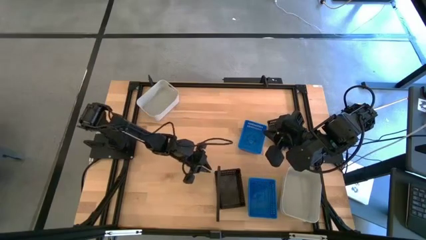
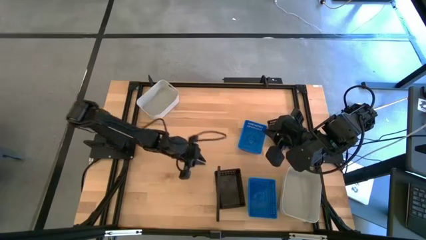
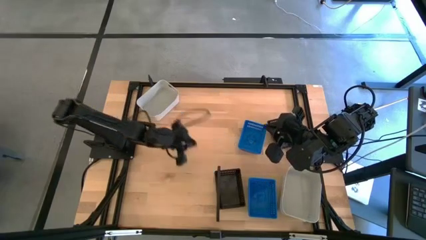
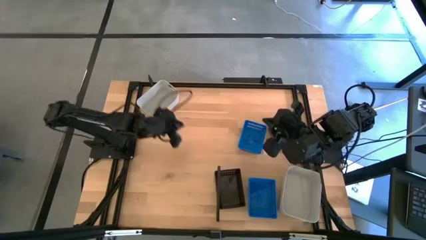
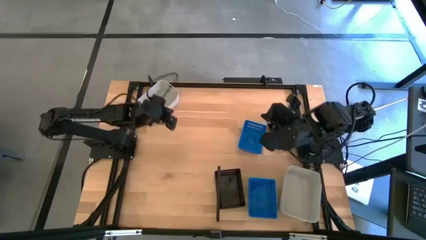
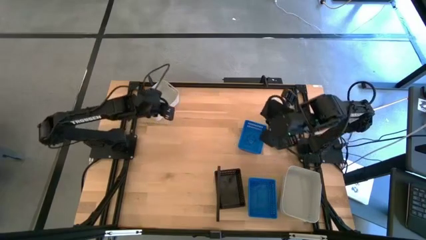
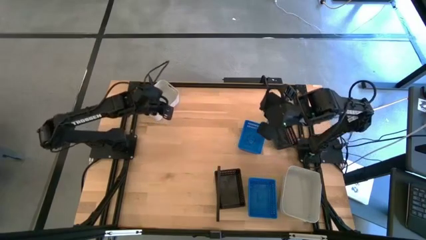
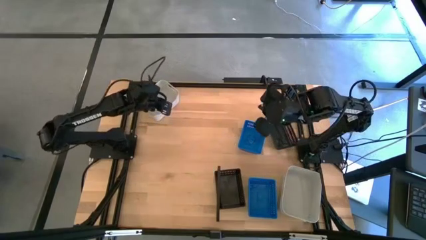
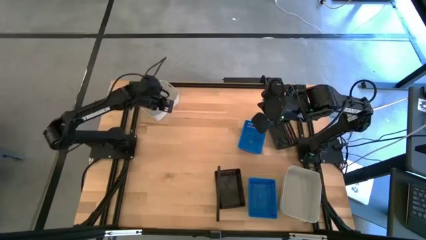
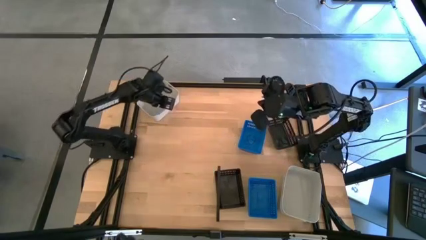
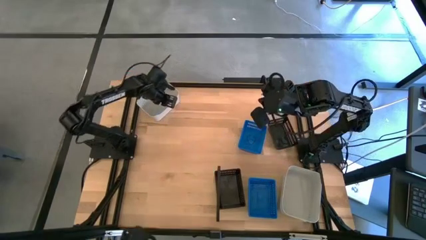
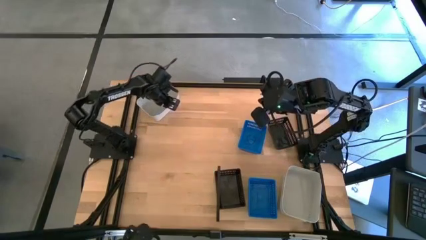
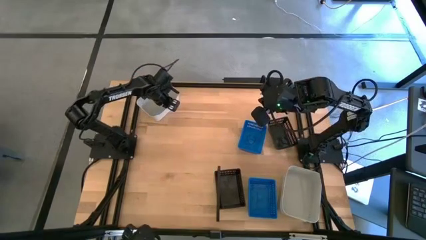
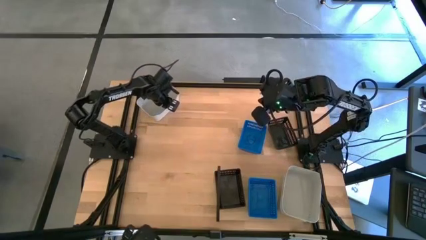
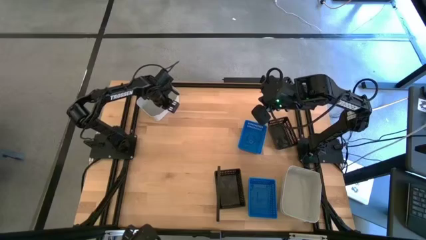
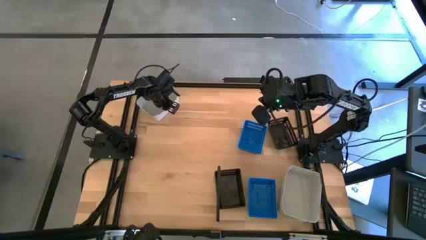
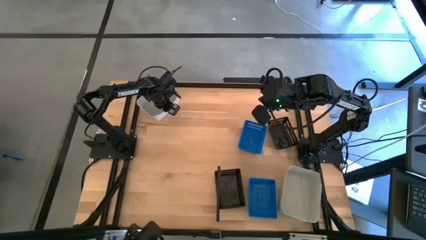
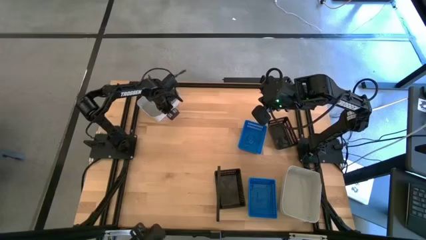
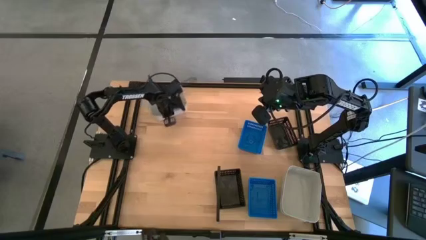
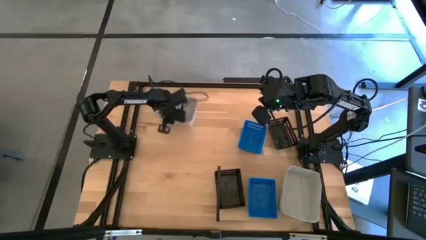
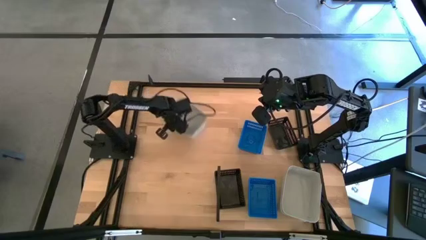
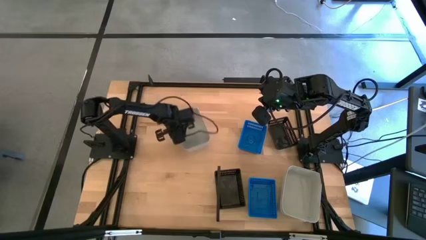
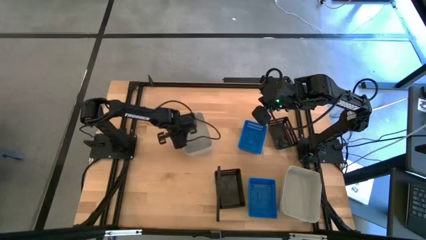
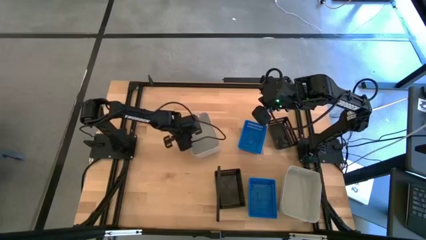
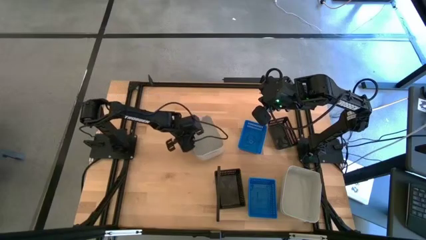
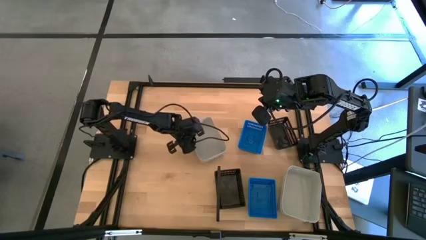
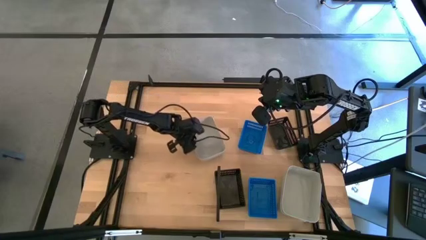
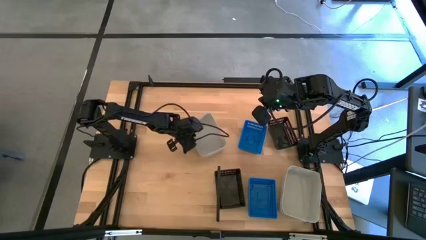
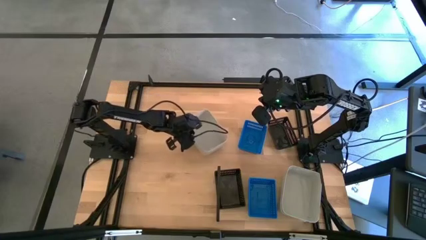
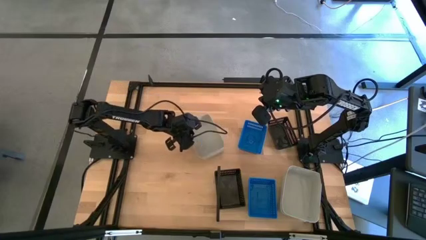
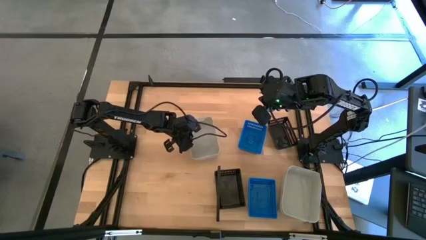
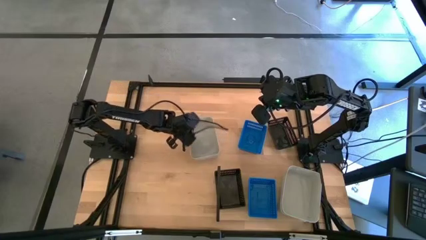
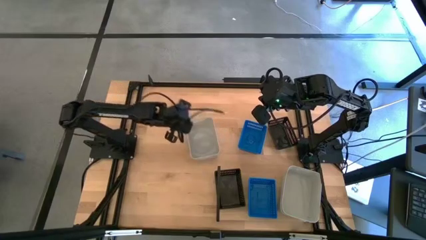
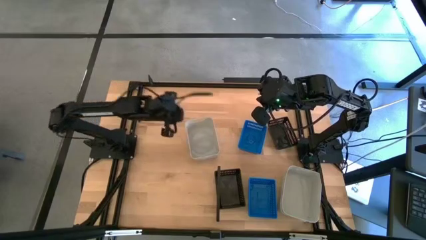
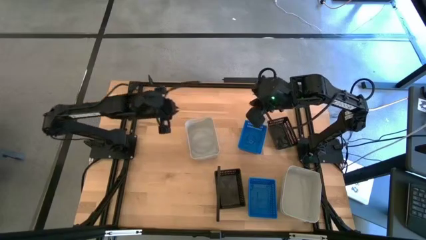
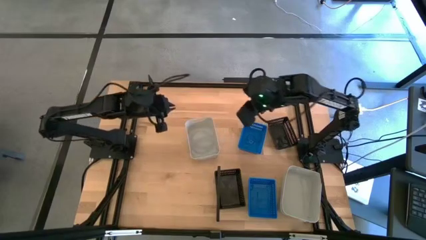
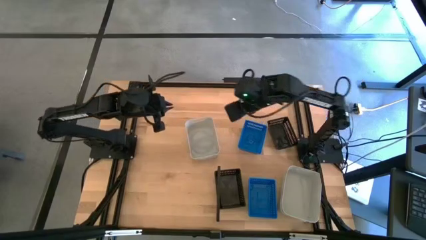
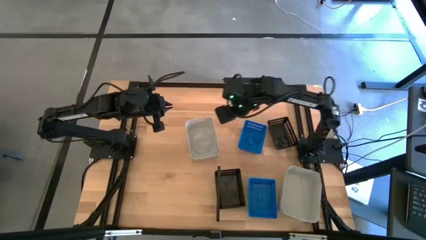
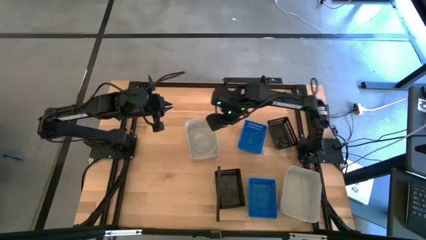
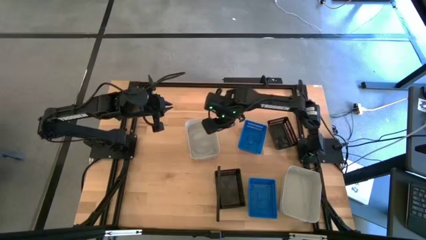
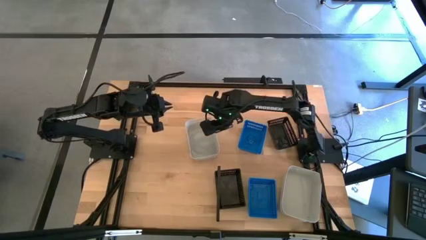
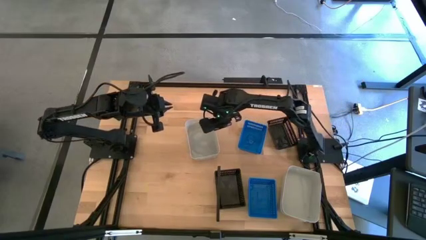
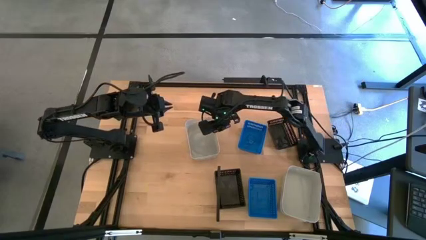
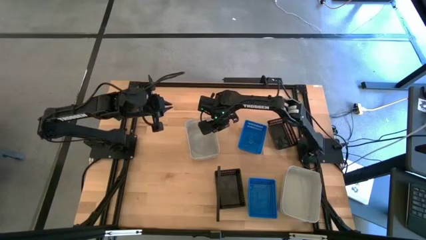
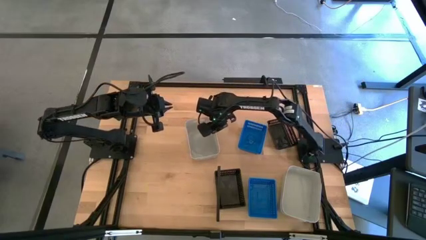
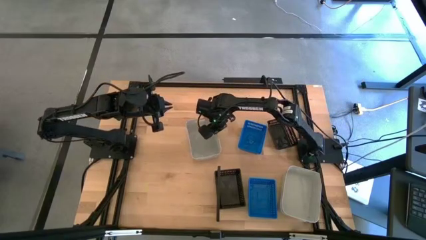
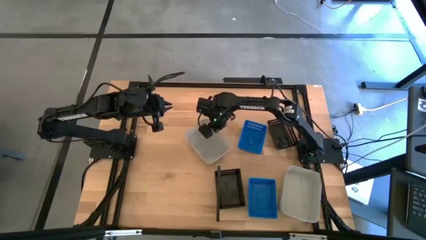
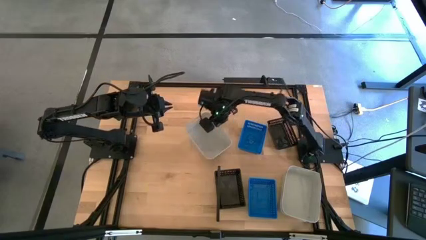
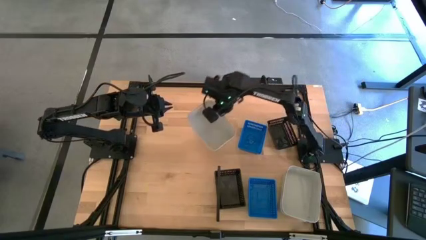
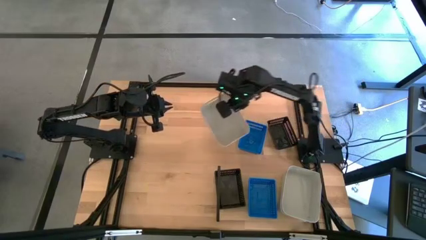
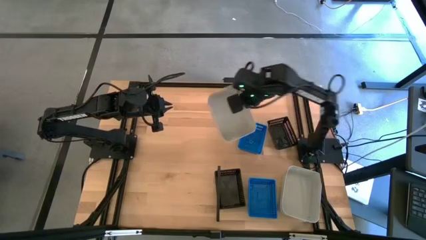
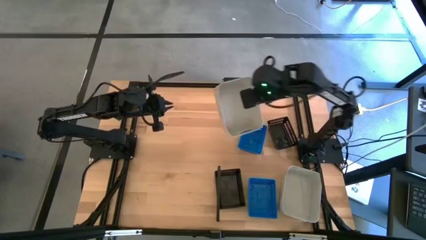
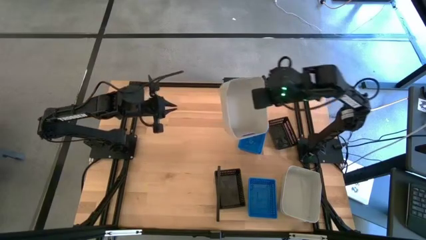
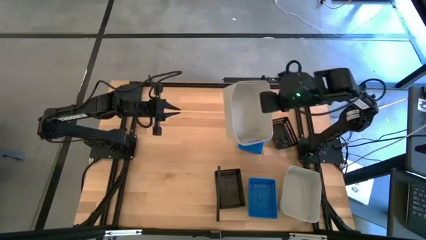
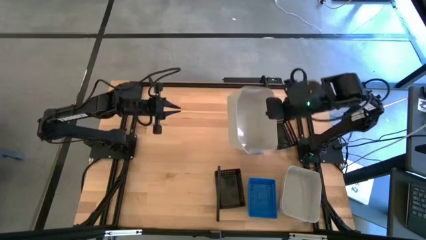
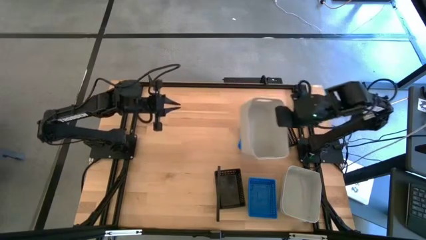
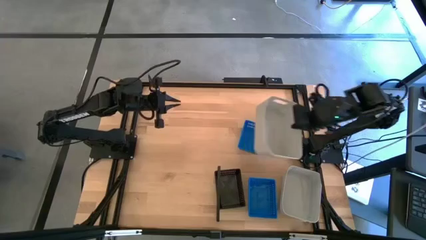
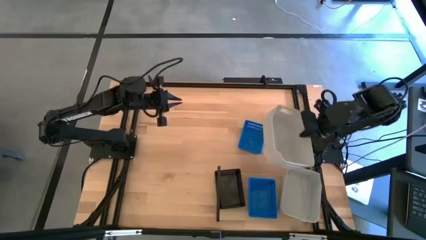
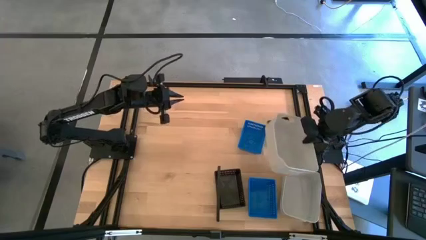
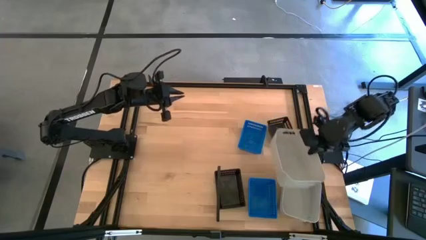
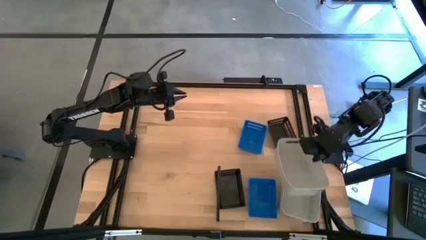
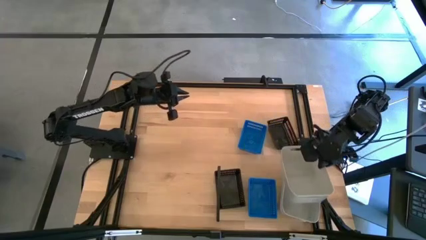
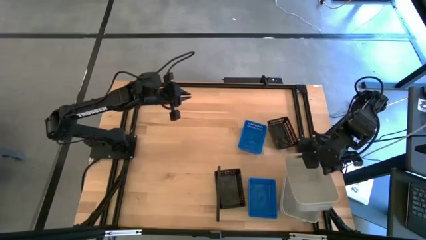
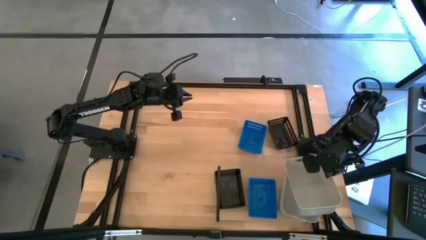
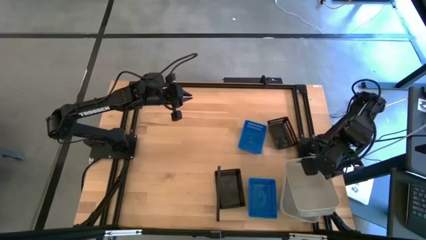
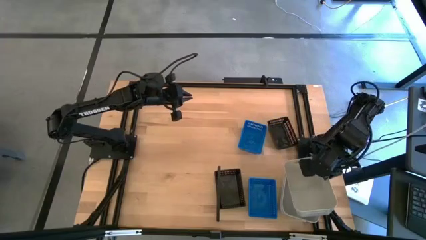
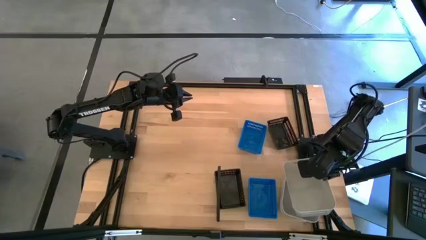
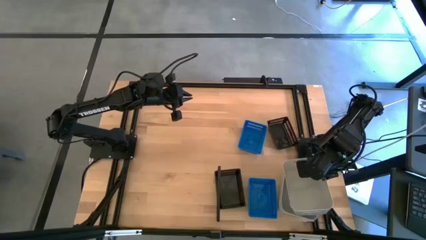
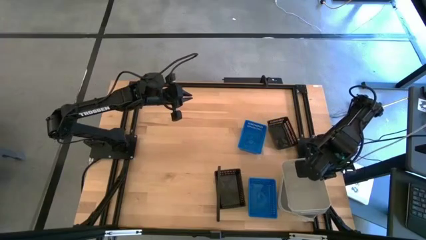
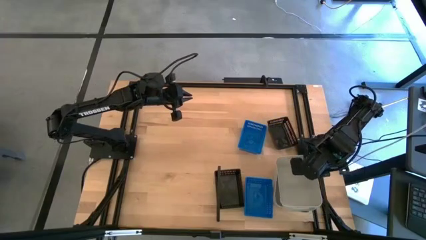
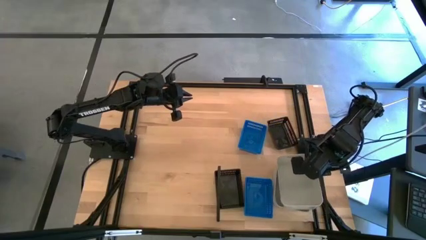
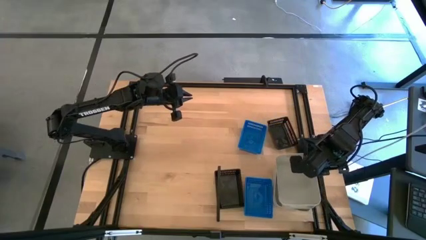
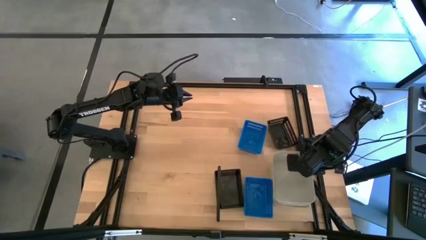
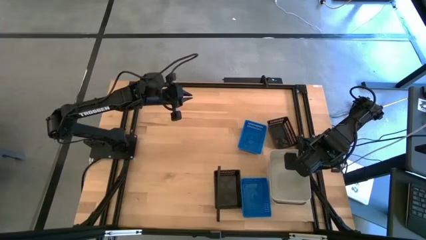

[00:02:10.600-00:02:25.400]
Task: Stack baskets on shelf by color
Stack the gray bin on top of the gray bins on the shelf

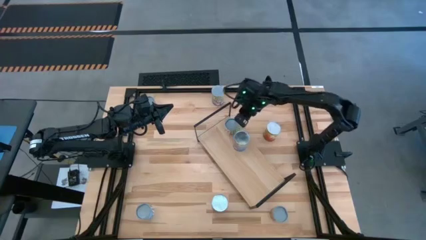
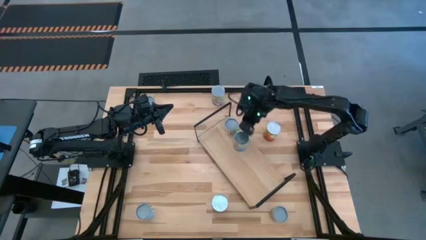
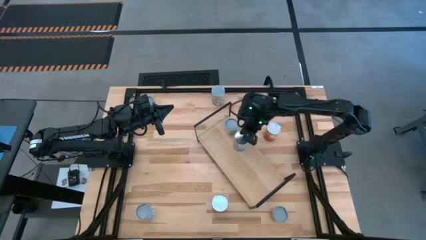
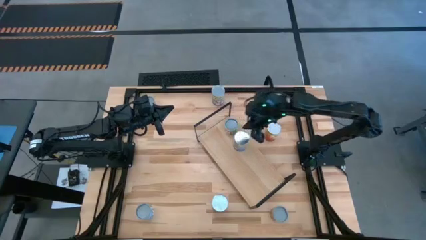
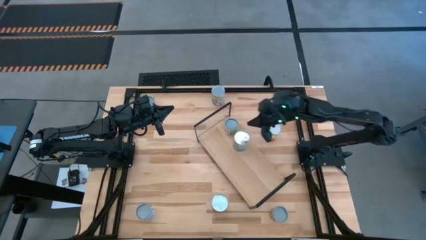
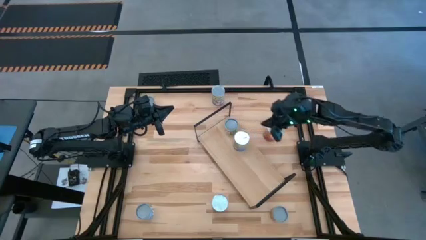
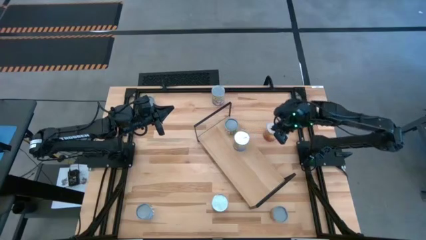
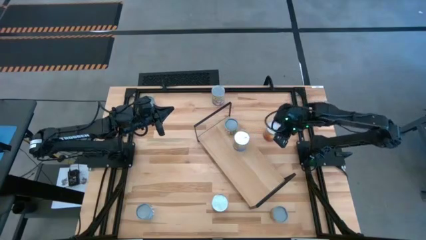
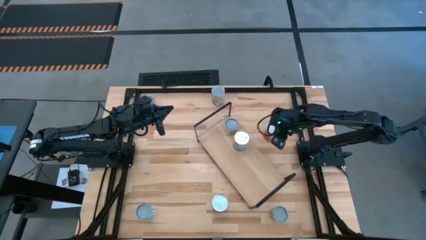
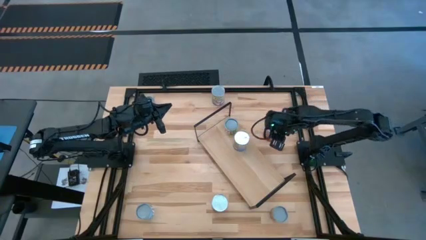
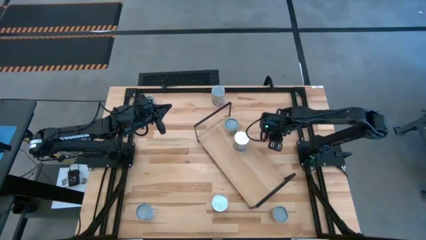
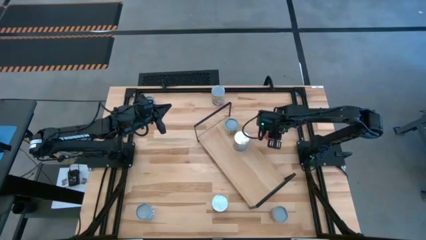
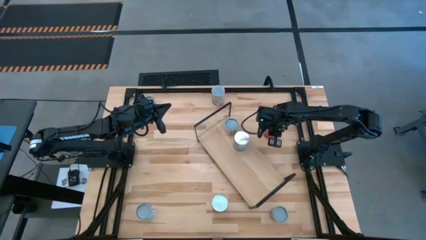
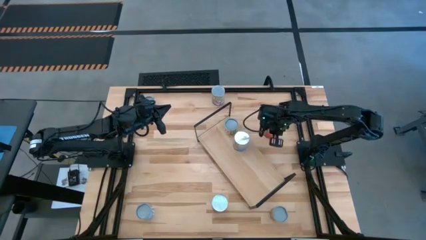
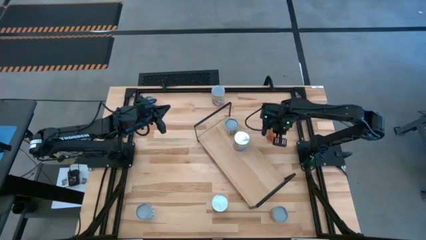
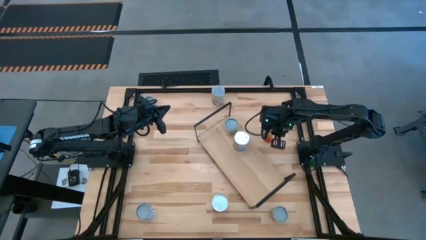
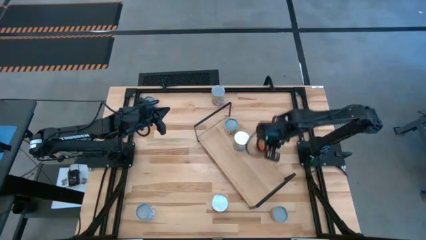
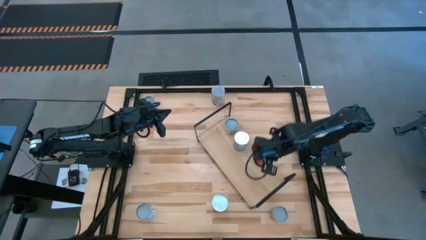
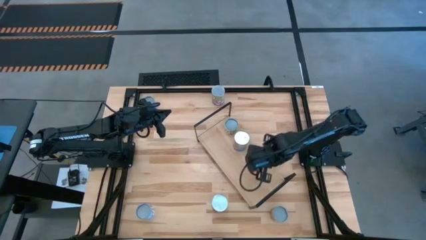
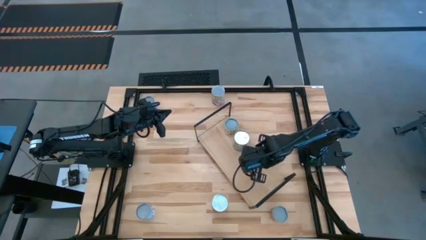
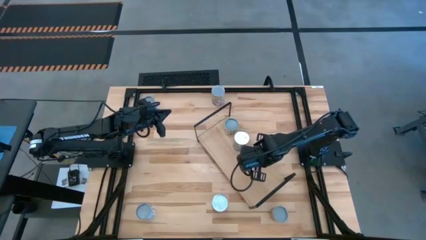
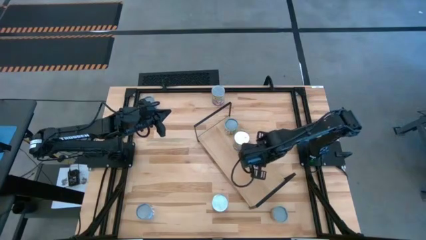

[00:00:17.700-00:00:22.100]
Task: Pick and place cans onto a shelf
Put the top canned corn on the shelf
